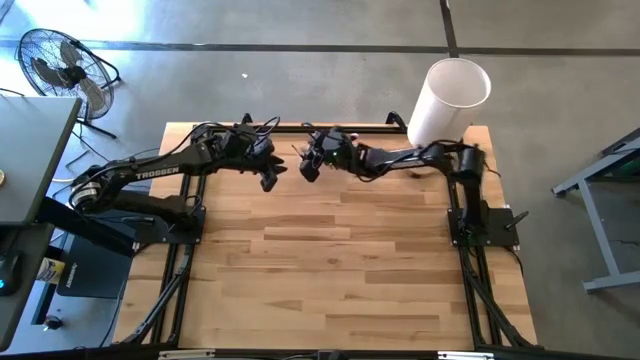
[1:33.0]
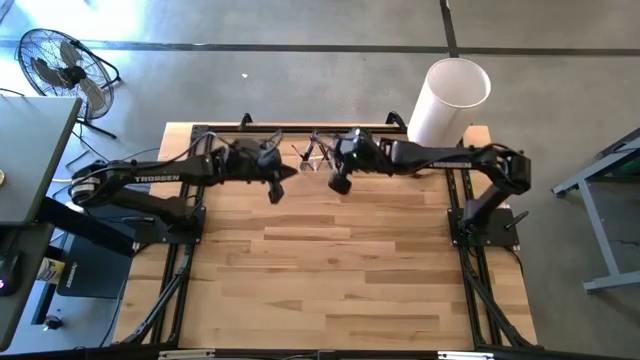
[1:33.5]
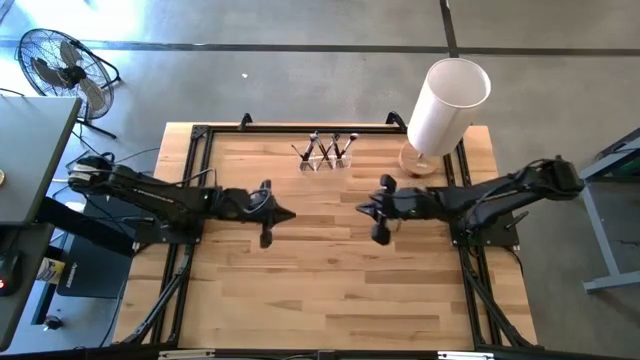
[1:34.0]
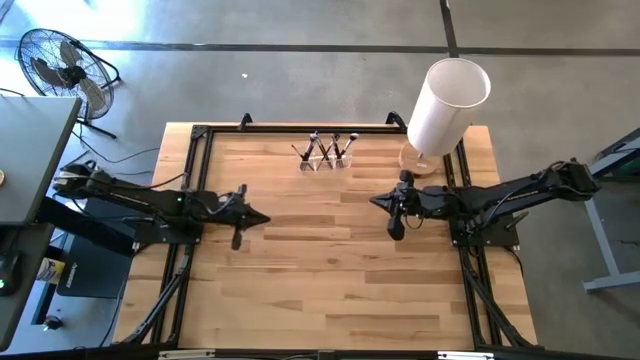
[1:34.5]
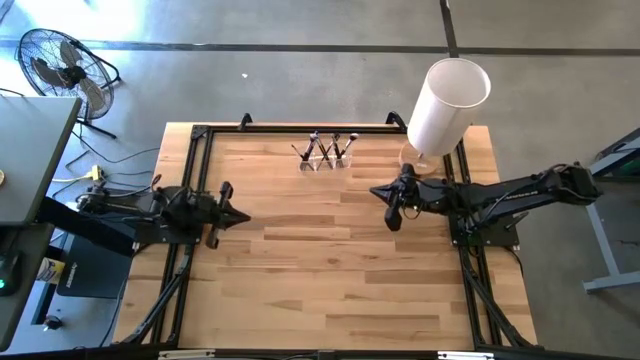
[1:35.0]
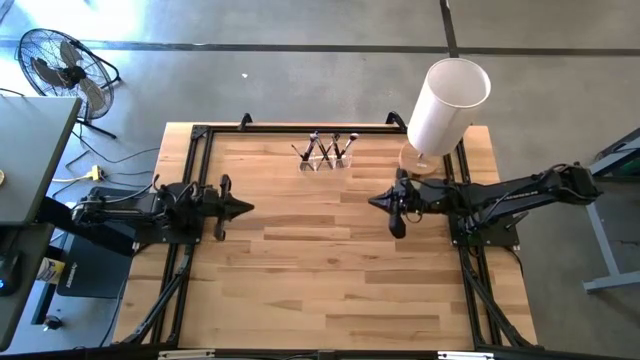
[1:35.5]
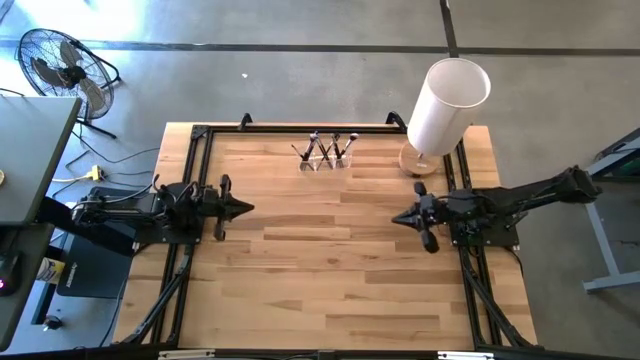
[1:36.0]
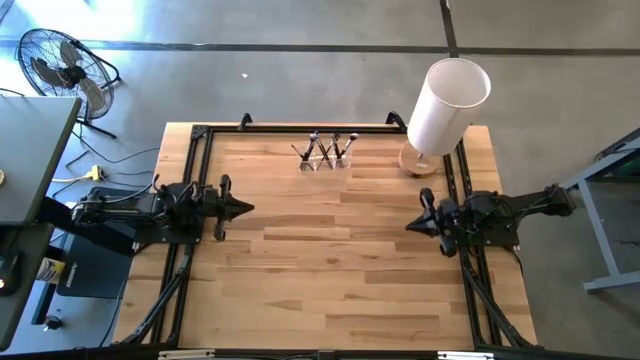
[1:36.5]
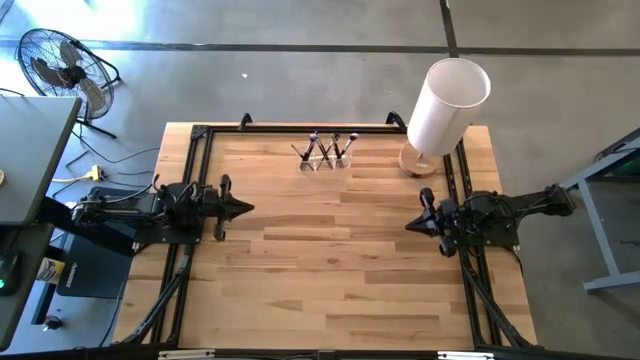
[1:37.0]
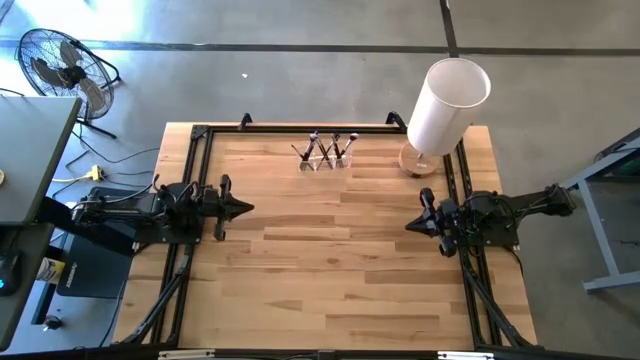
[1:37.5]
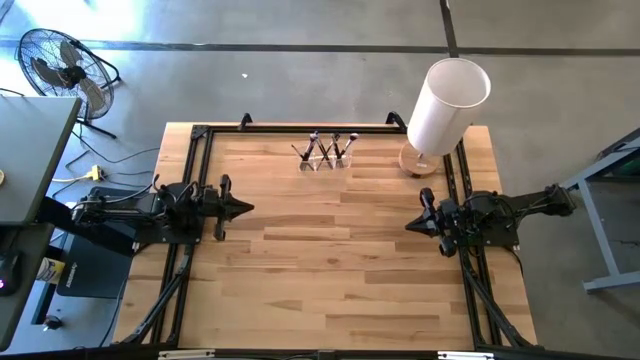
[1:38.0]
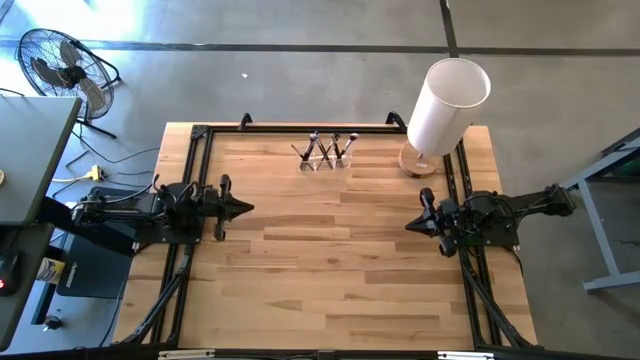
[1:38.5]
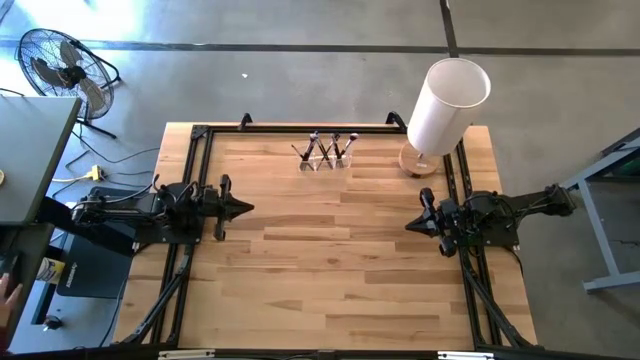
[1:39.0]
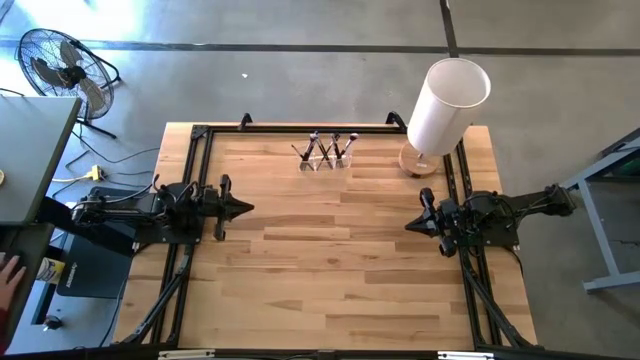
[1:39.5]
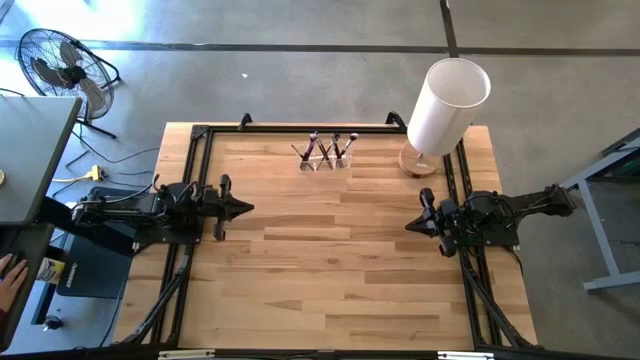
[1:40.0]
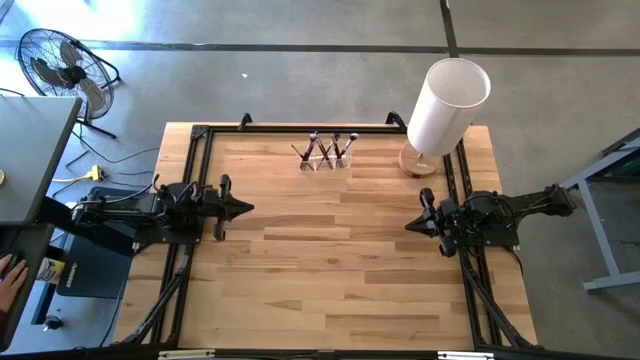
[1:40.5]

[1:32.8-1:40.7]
Task: Pick & Place Makeup Brushes
Return to Home Position

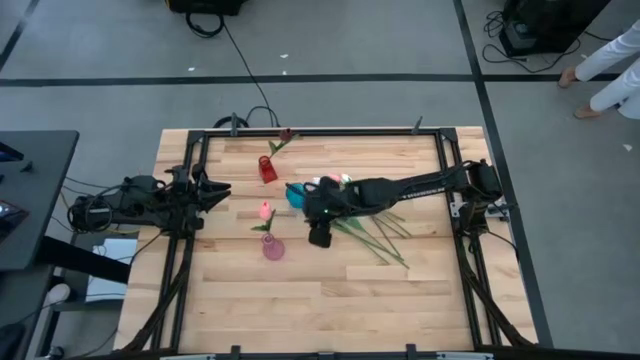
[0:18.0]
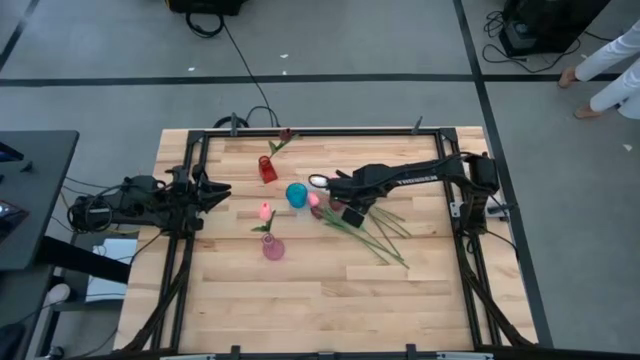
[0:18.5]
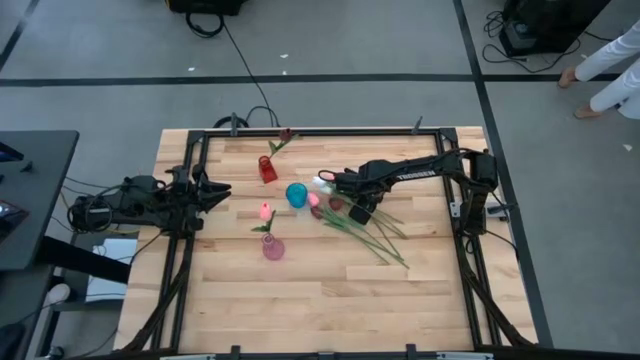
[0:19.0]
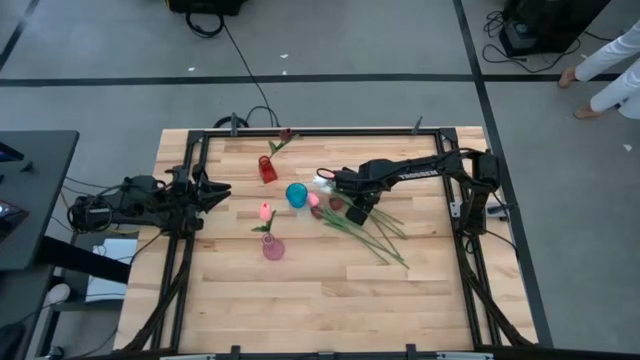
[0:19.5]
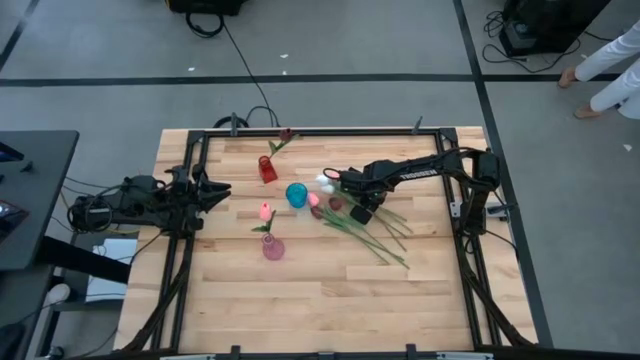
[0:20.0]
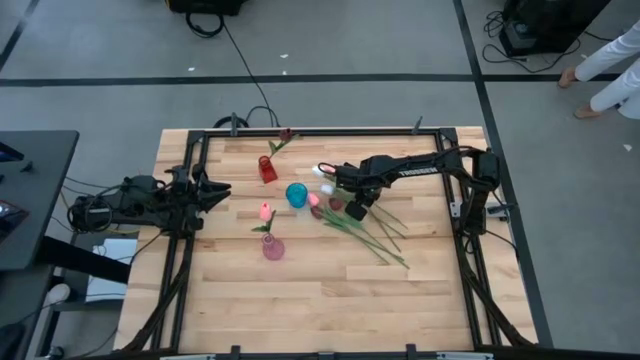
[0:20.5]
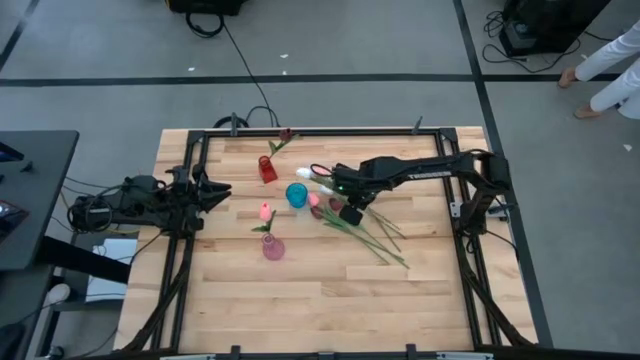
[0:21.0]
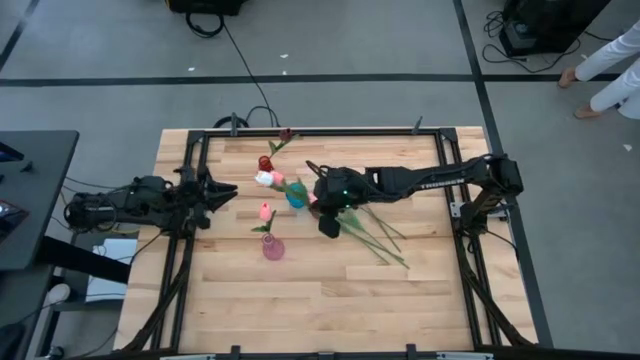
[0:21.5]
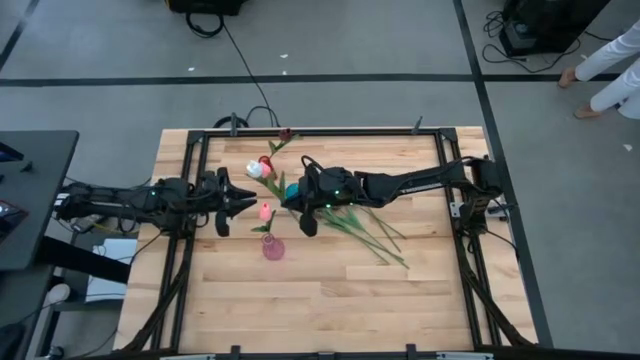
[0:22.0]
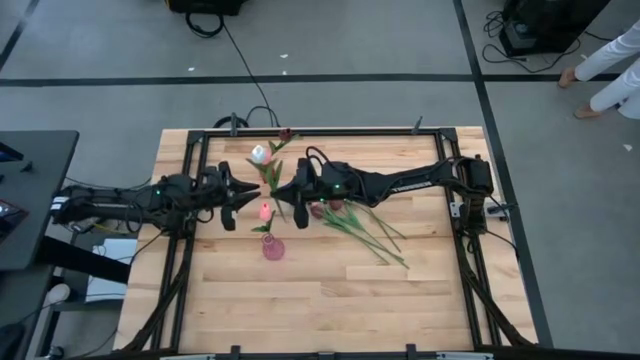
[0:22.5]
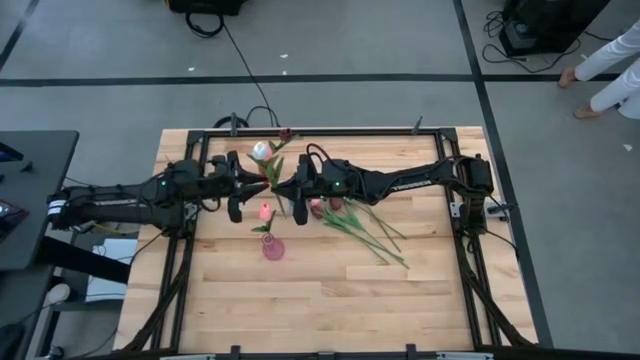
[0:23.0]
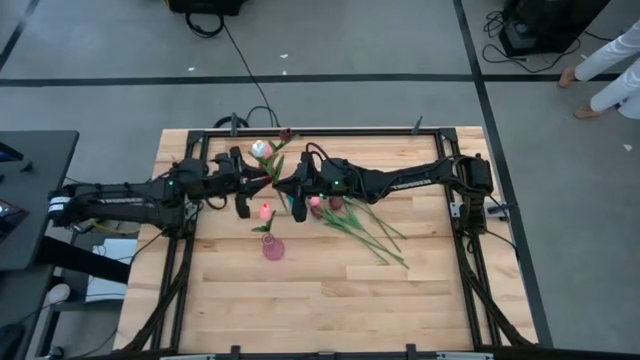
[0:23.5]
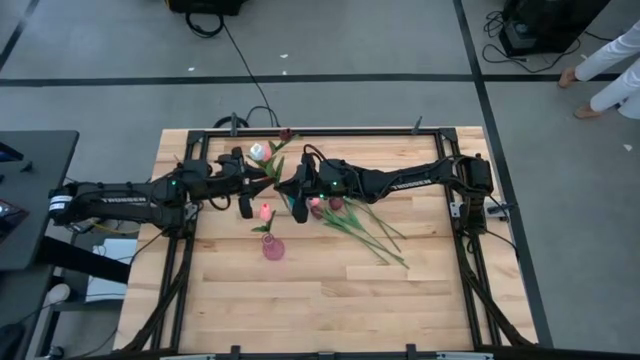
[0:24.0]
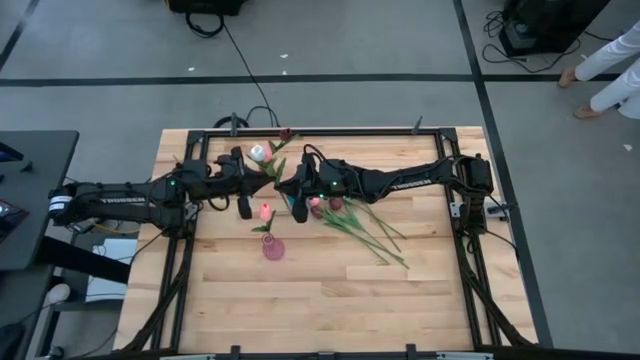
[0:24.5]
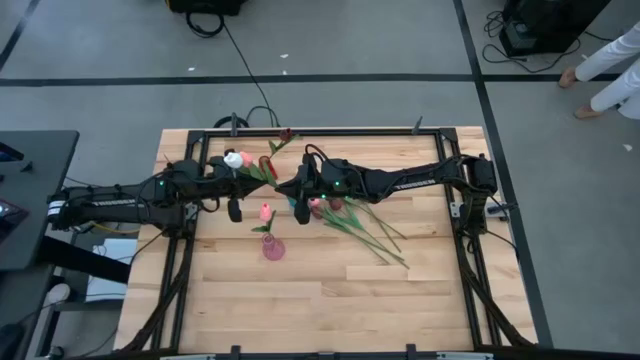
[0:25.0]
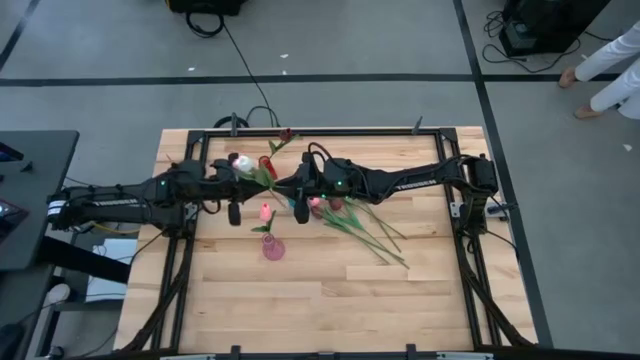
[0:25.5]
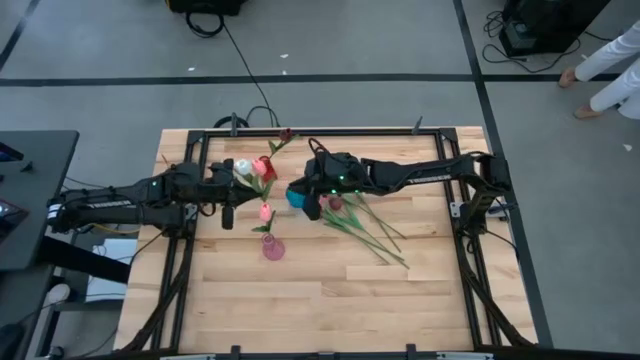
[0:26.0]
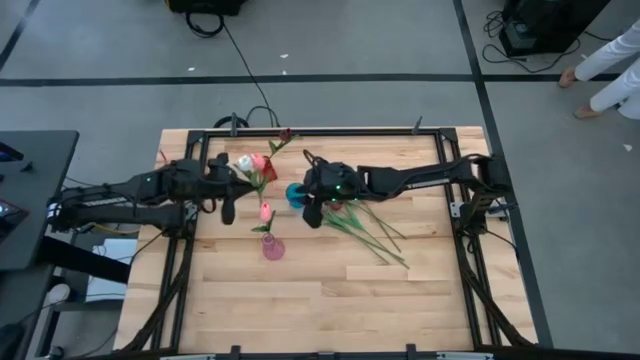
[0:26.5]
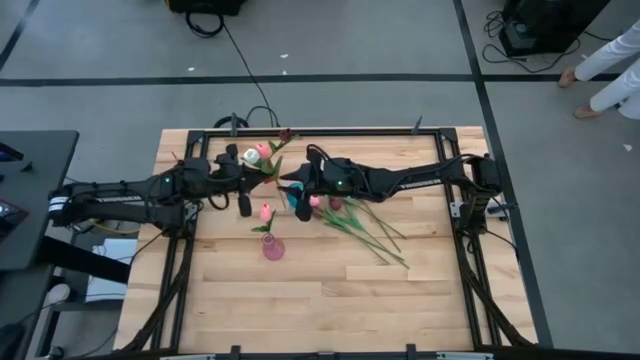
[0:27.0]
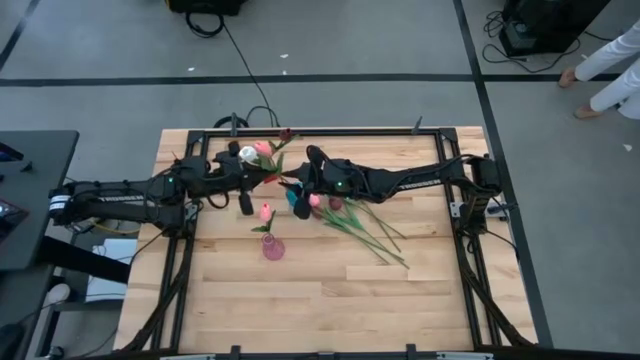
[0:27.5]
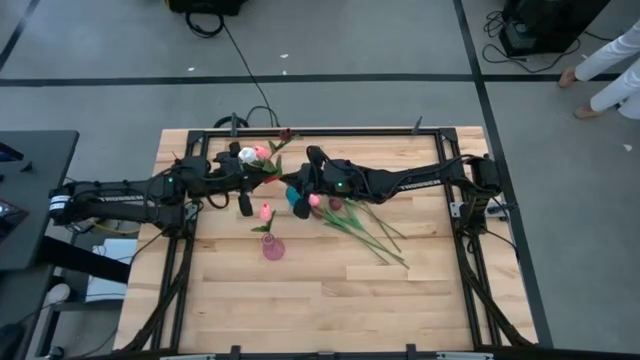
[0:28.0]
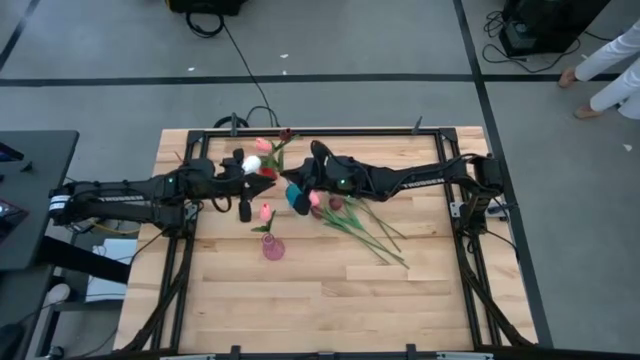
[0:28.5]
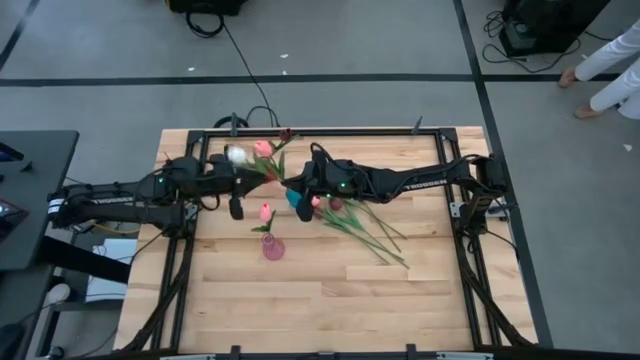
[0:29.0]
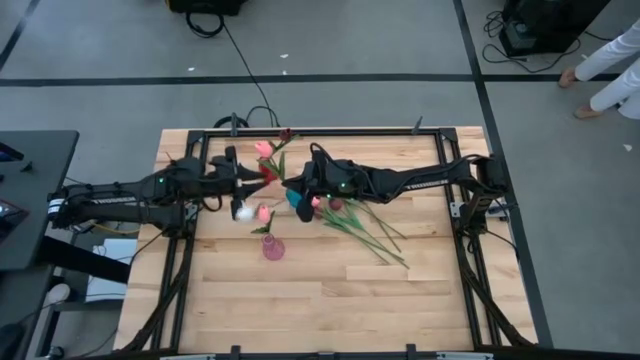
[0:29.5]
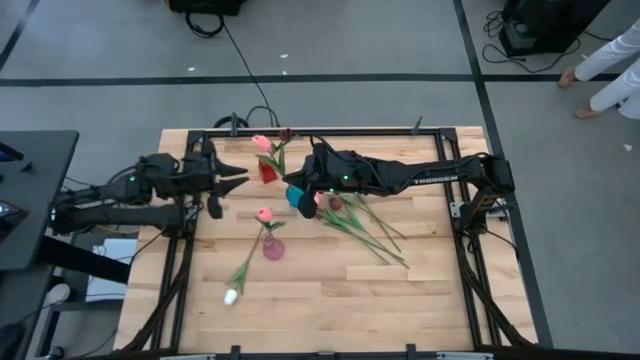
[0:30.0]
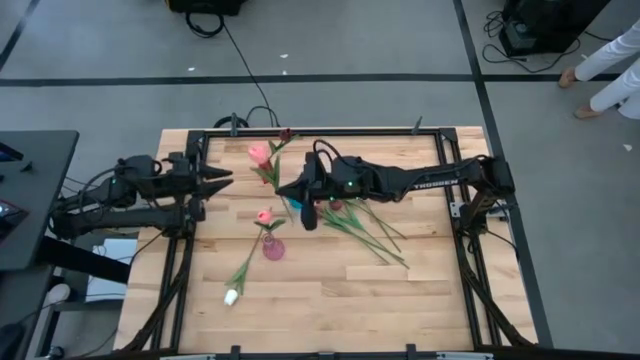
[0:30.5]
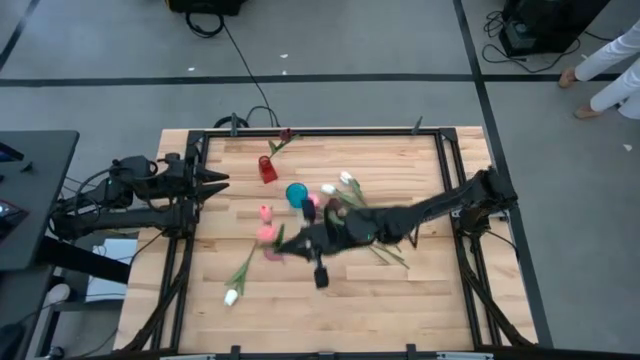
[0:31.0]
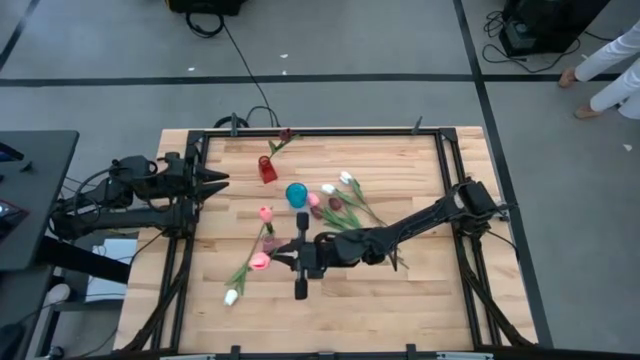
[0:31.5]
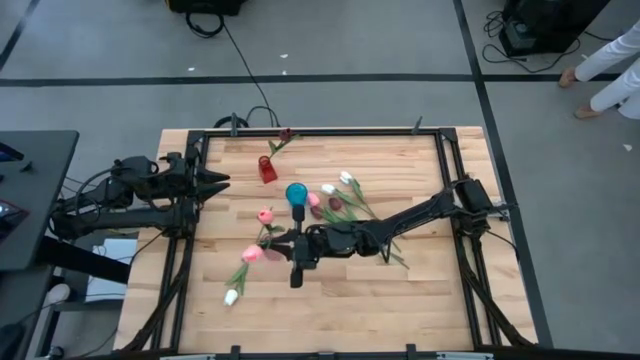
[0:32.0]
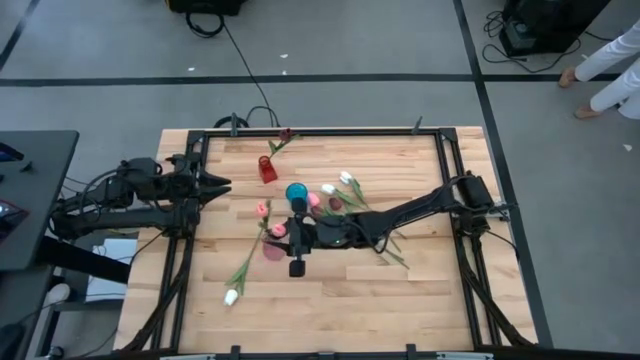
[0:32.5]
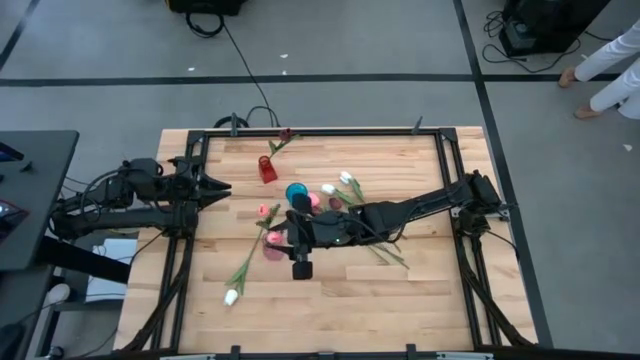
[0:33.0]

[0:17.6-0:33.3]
Task: Sort flowers into vase by color
Put the right pink flower into the pink vase
